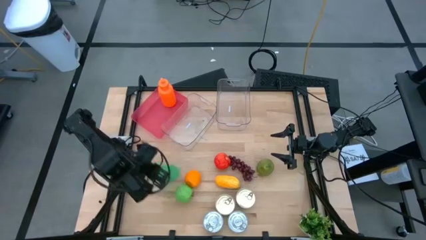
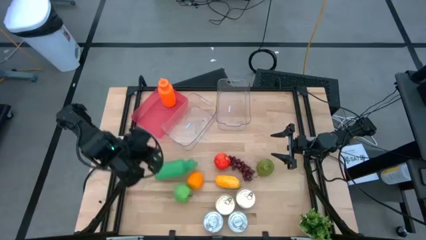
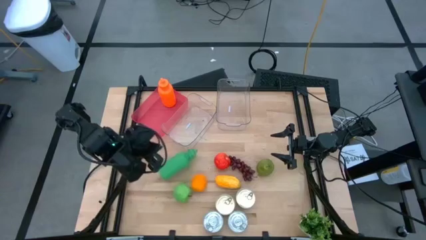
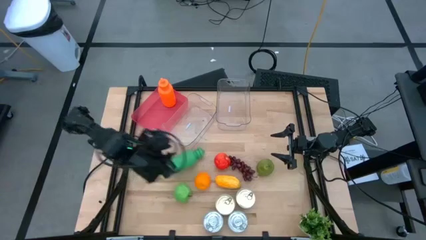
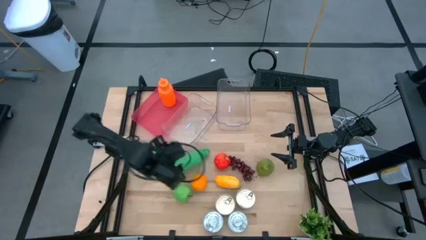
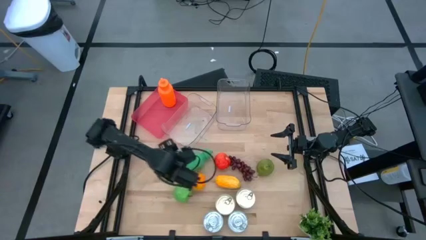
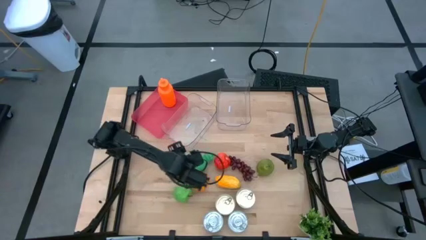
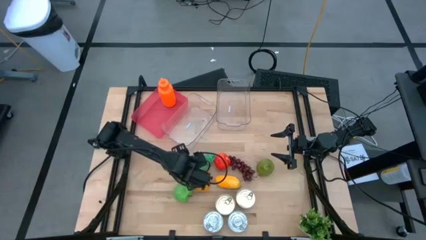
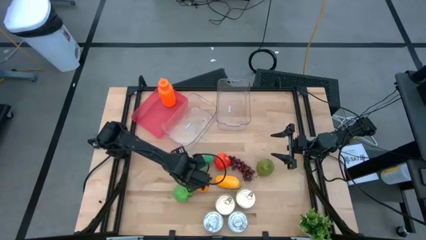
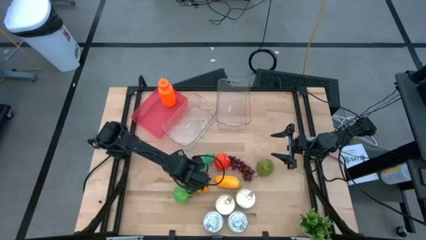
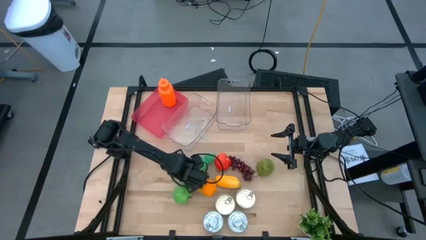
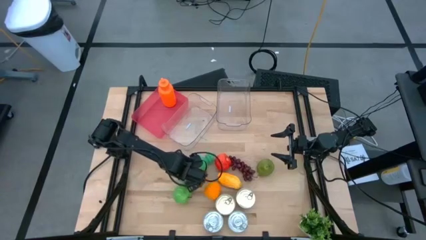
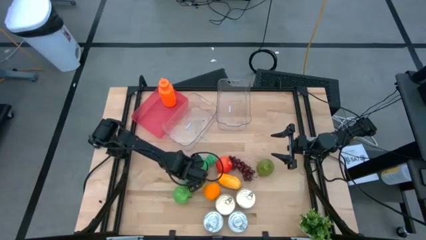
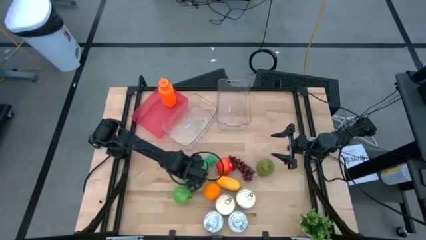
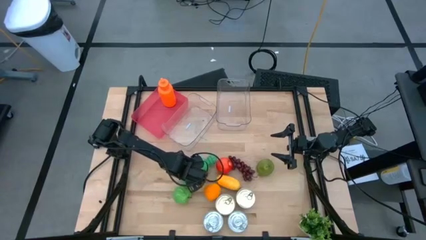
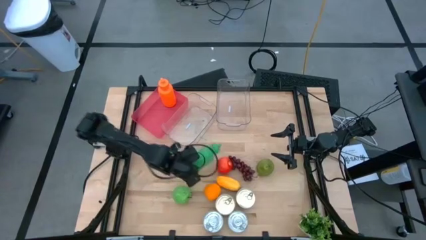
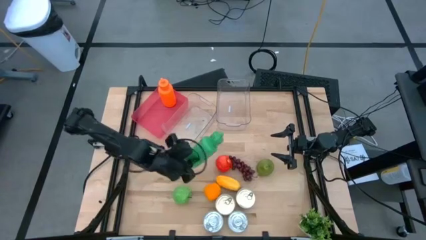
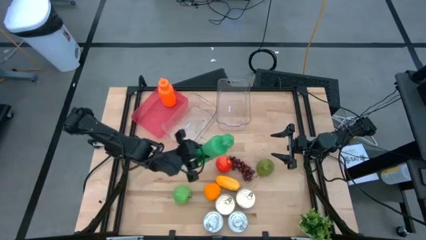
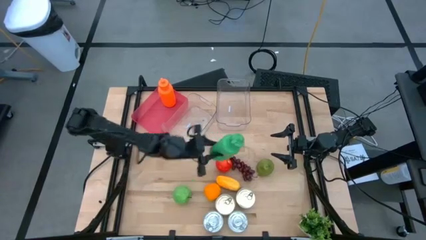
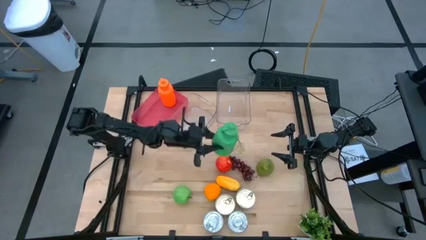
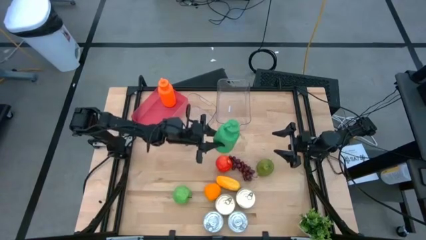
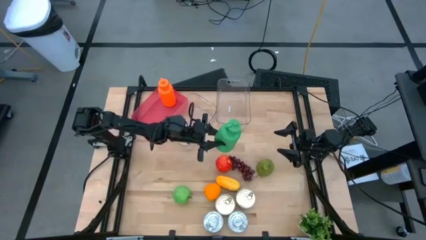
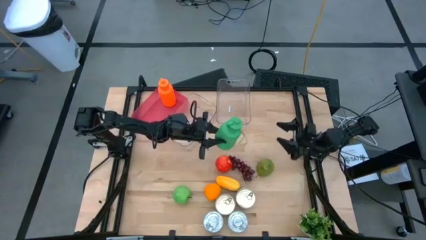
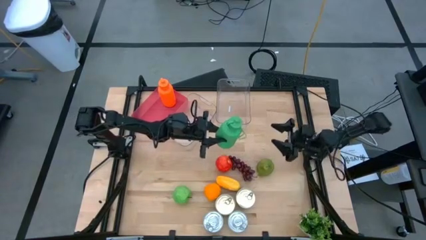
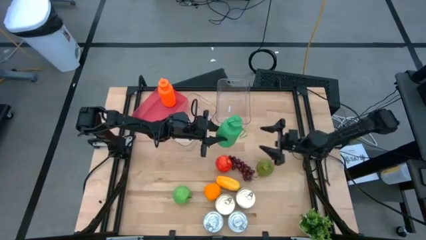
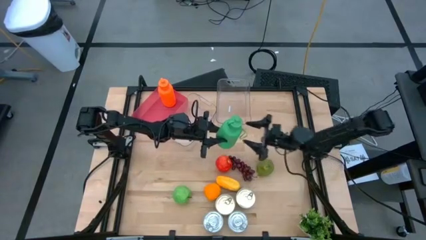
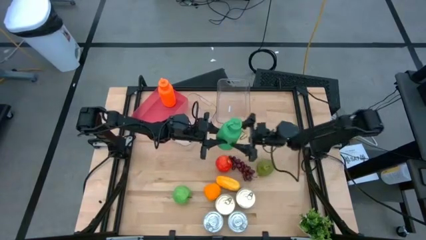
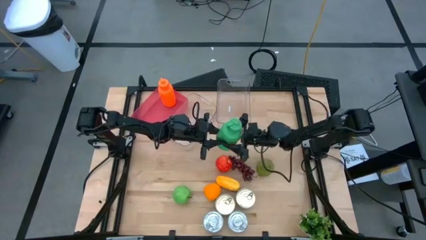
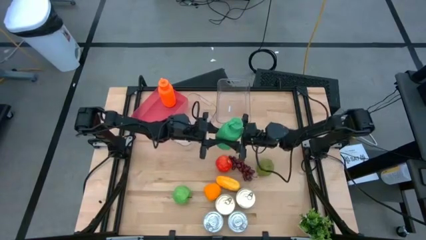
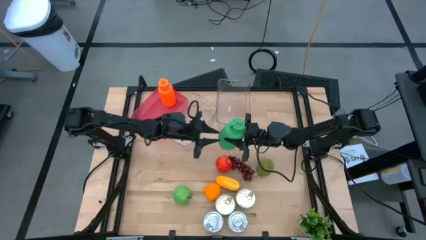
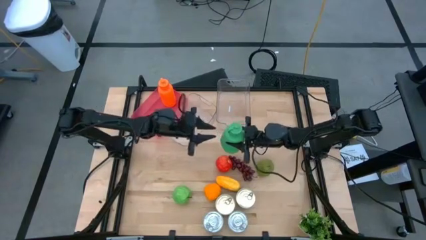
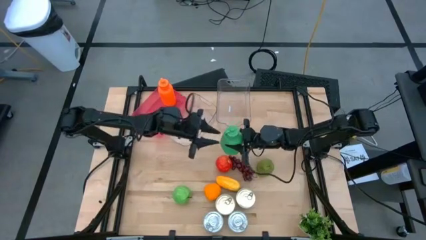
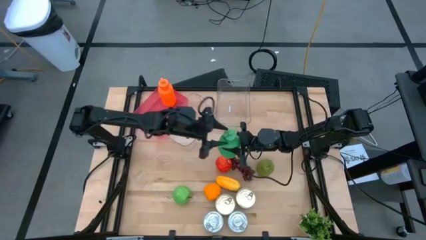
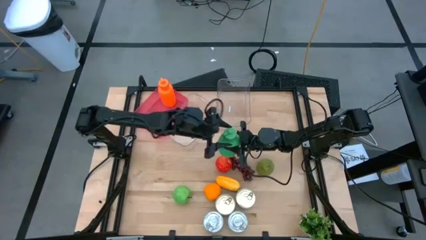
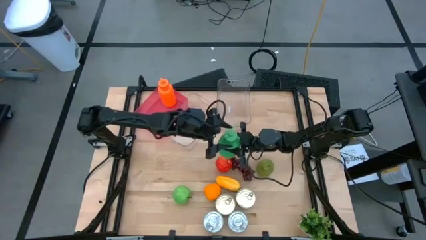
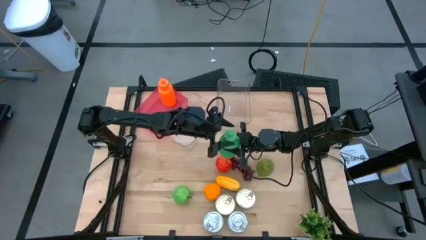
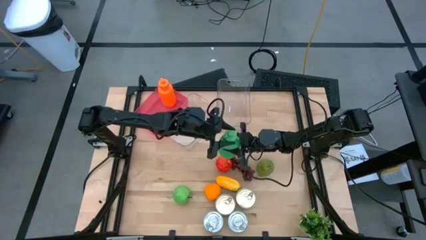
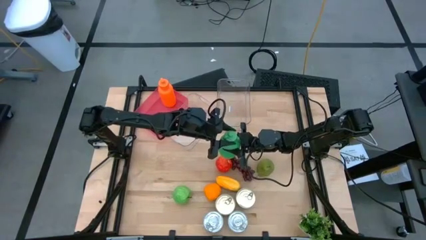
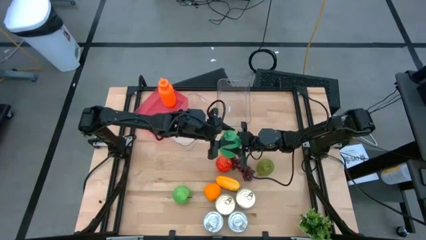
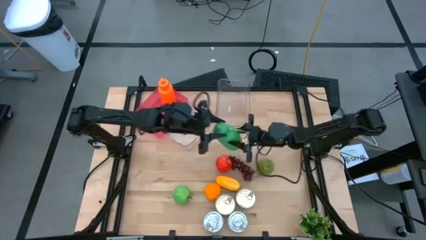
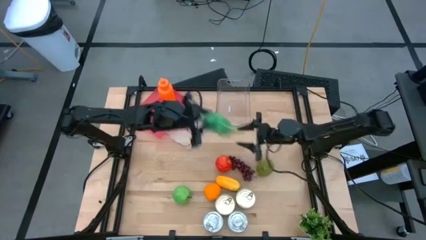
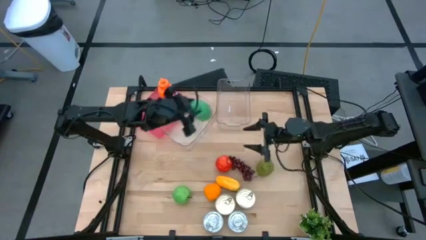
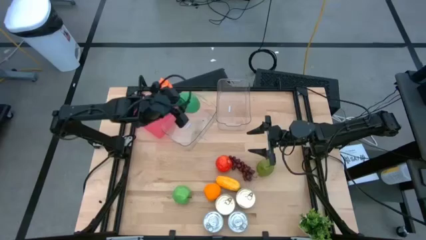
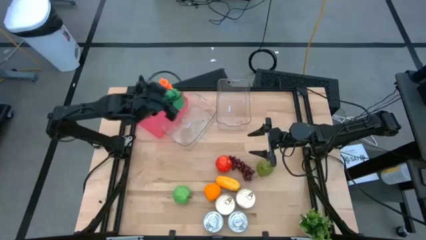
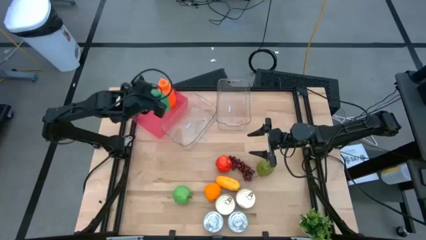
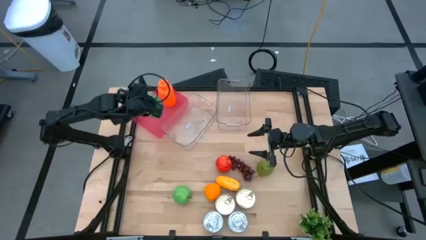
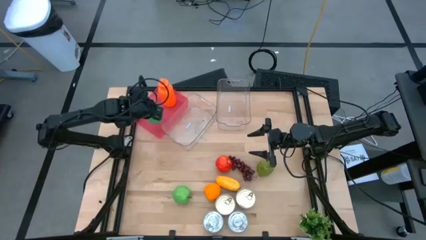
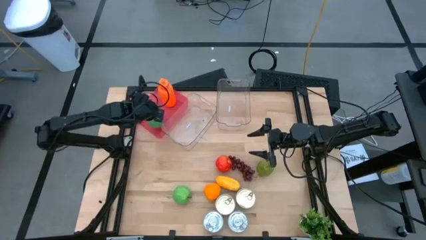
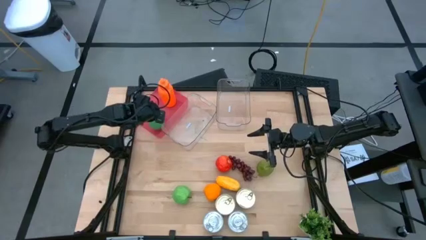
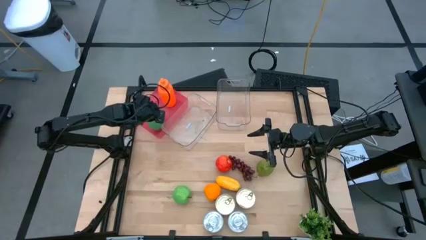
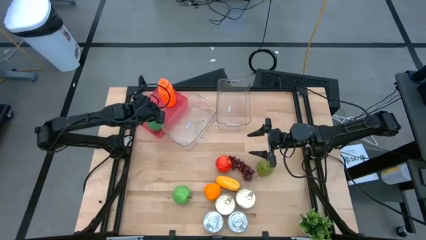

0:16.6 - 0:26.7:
Task: Pick & Place Food Item
Put the green water bottle into the pink bin

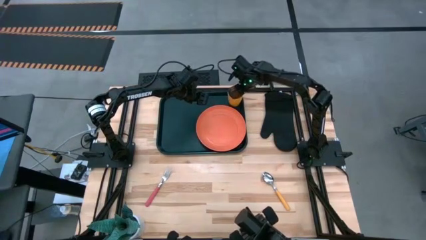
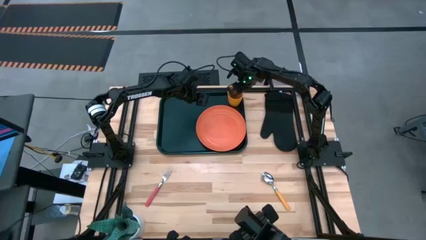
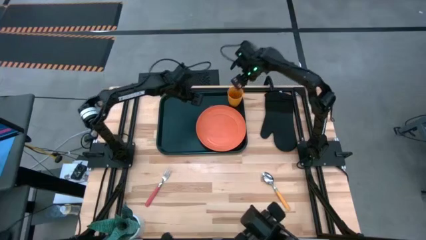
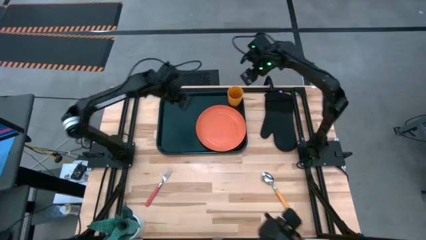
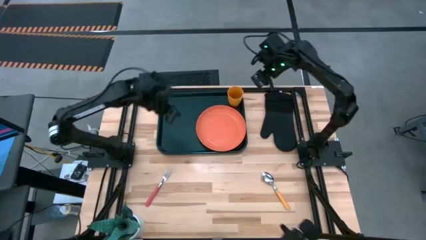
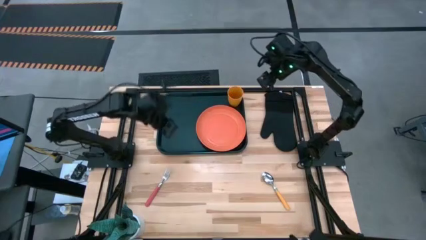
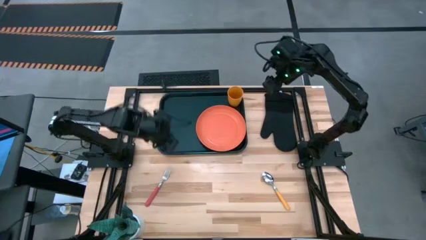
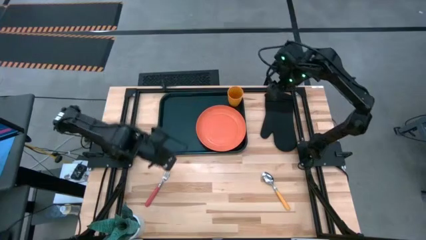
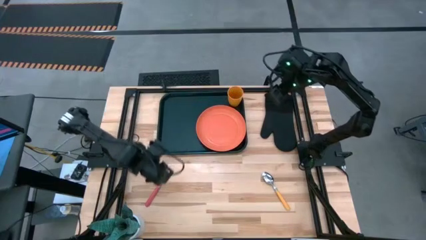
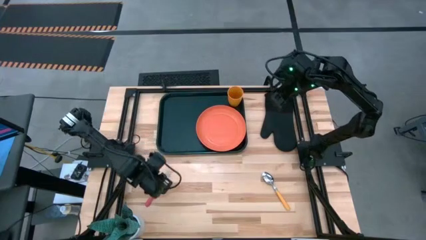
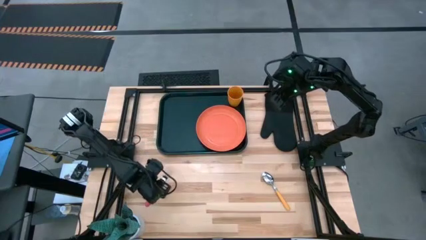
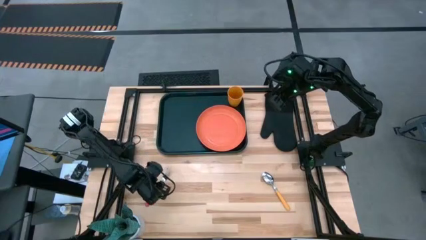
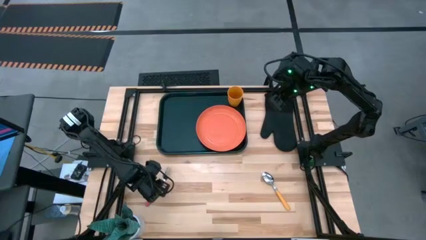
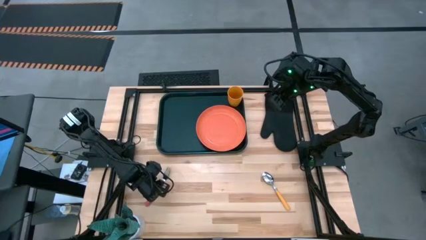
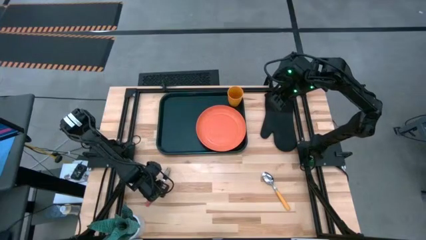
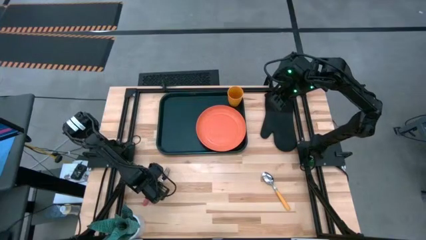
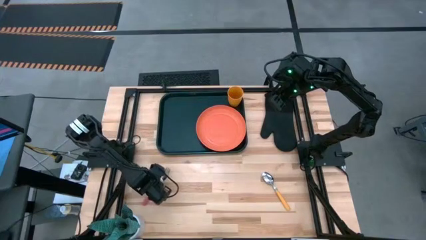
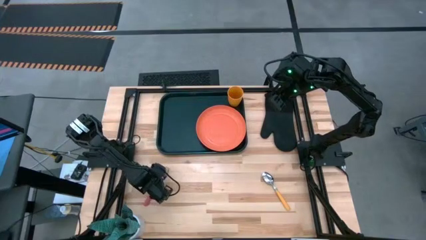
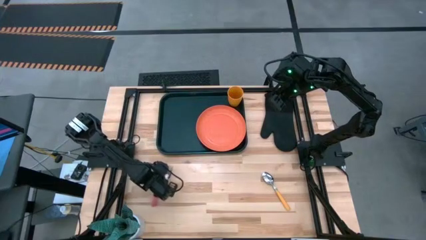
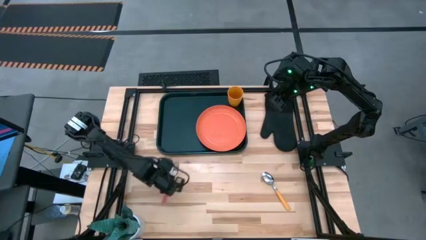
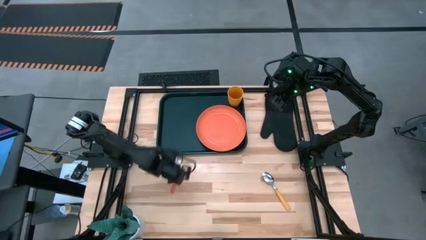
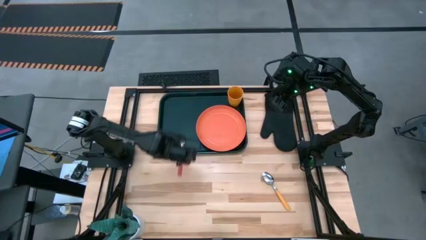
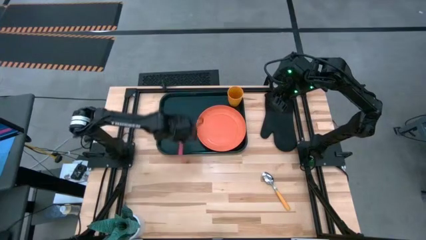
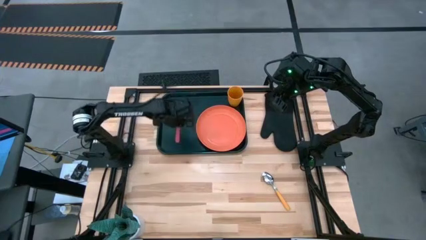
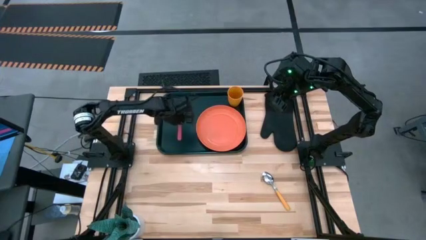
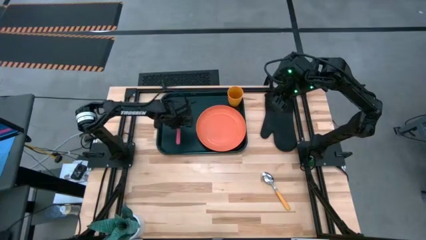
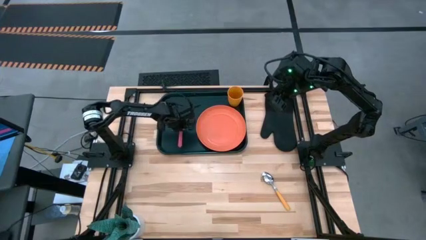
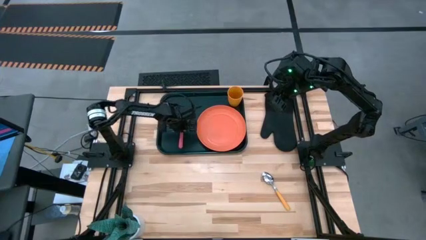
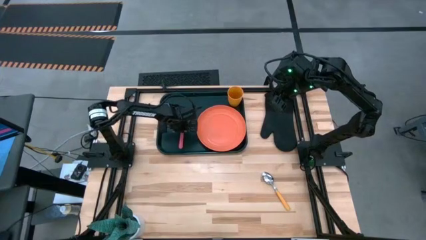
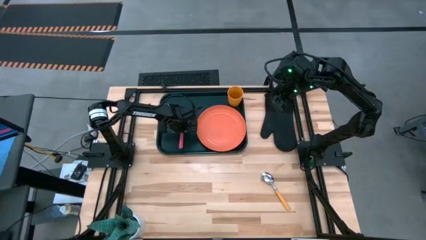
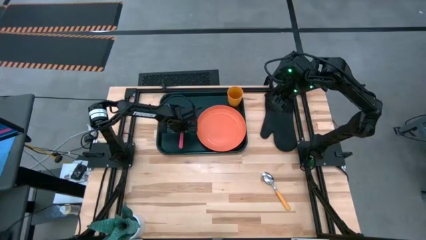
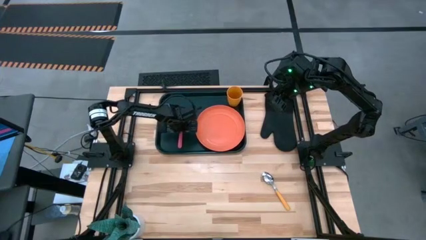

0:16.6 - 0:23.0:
Task: Pick and place plate/cup/fork/spoon on tray
Put the pink fork on the black tray to the left of the orange plate

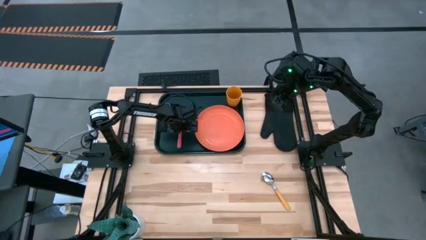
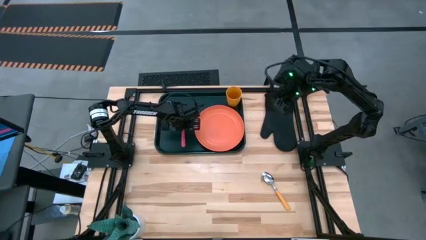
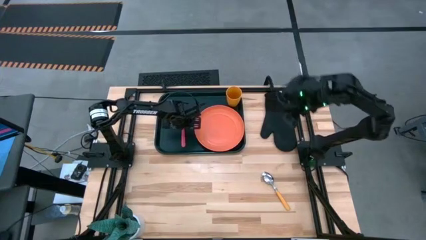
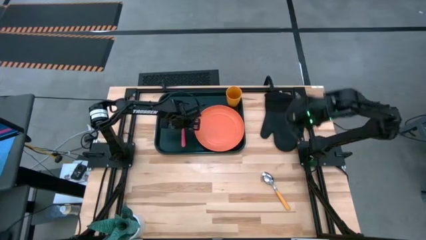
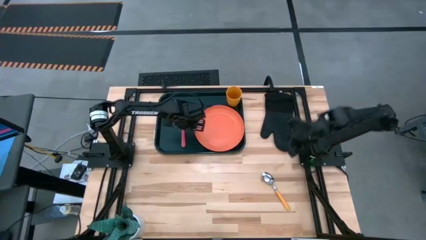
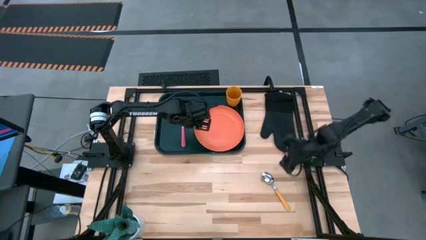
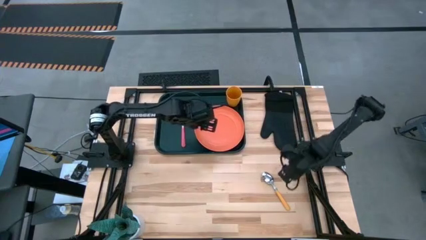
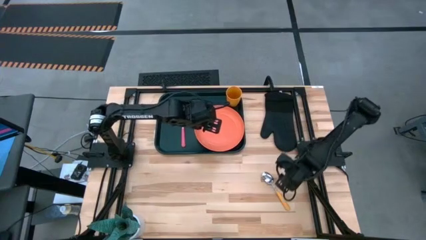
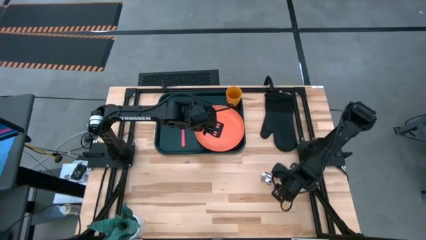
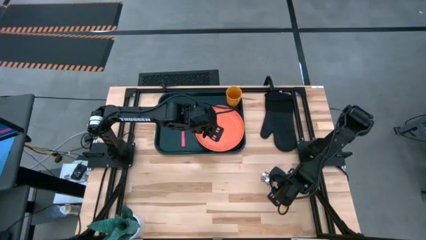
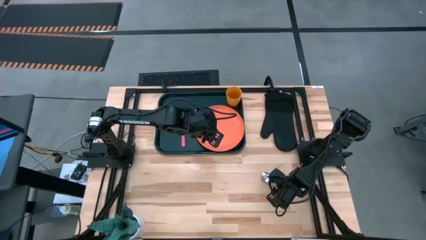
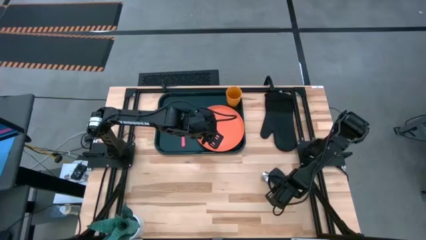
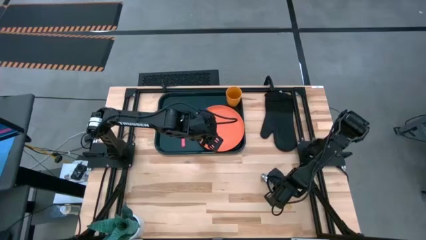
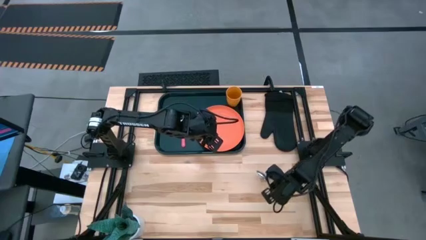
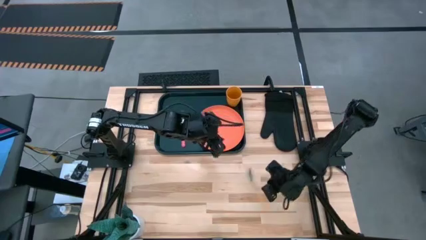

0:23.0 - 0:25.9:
Put the yellow spoon on the black tray to the left of the pink fork
